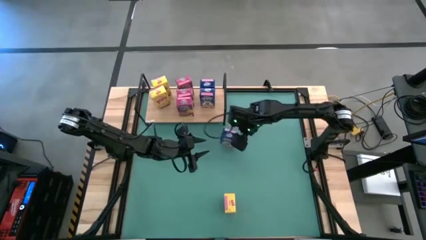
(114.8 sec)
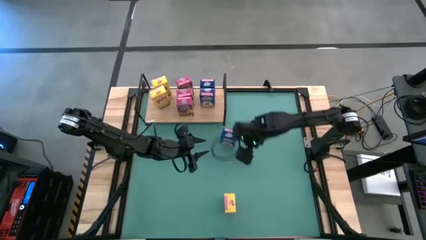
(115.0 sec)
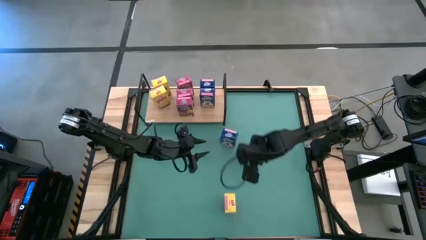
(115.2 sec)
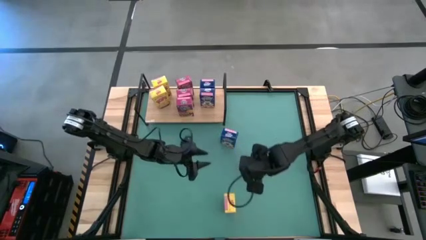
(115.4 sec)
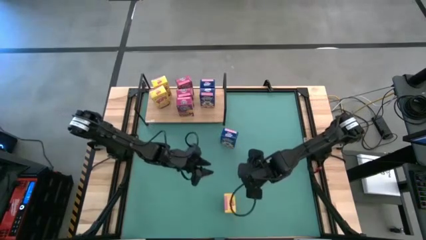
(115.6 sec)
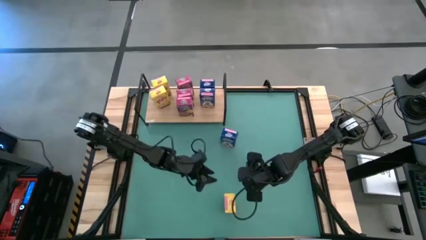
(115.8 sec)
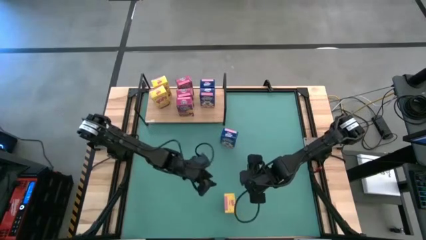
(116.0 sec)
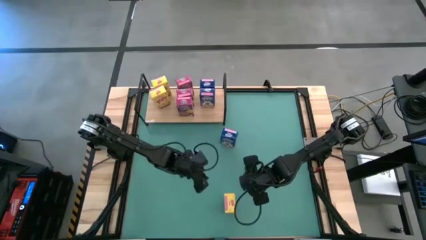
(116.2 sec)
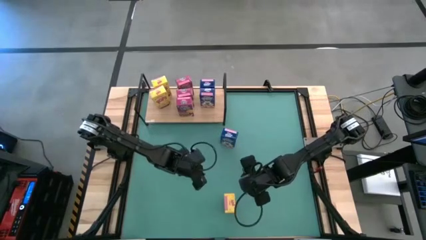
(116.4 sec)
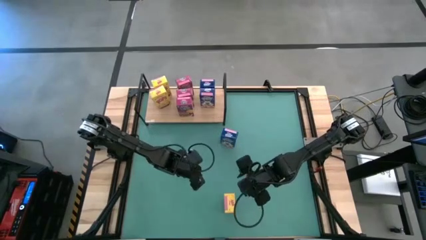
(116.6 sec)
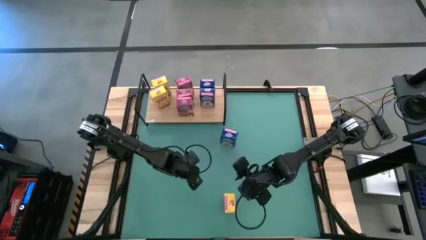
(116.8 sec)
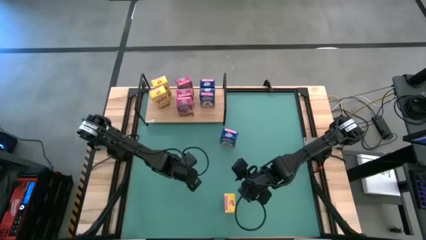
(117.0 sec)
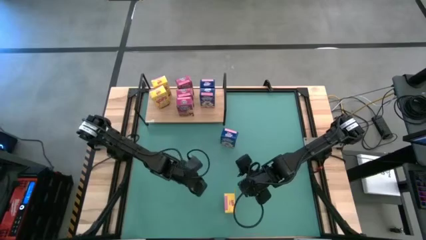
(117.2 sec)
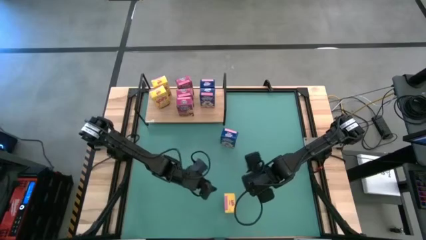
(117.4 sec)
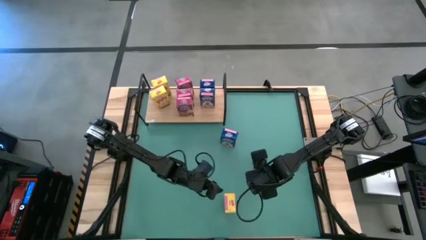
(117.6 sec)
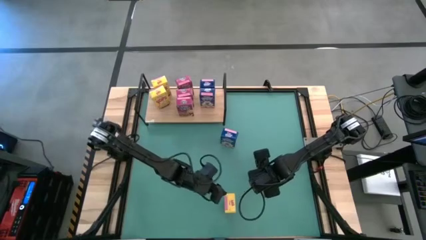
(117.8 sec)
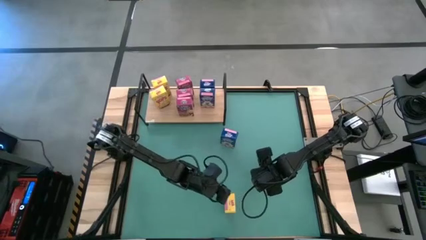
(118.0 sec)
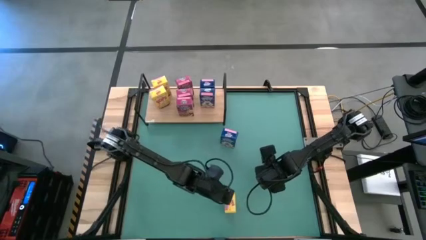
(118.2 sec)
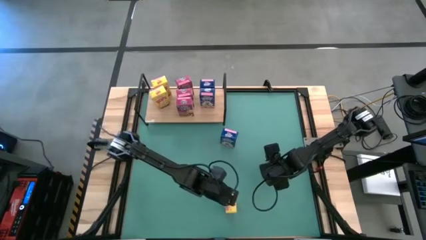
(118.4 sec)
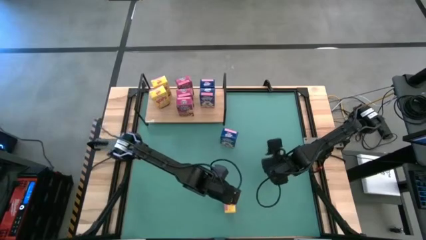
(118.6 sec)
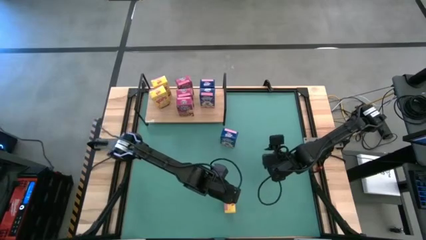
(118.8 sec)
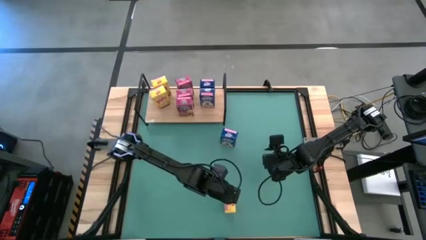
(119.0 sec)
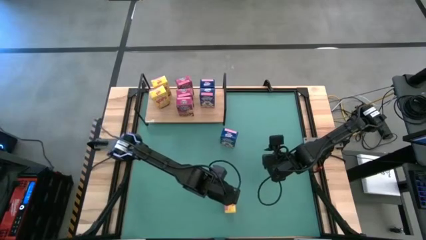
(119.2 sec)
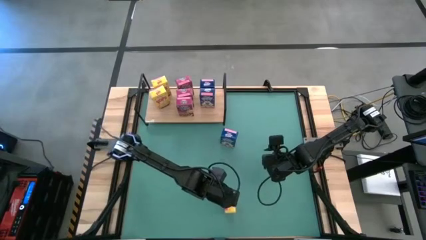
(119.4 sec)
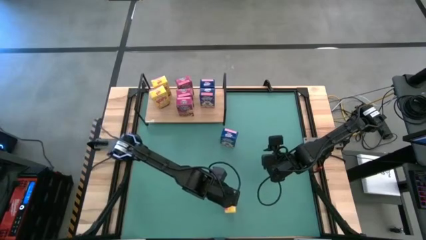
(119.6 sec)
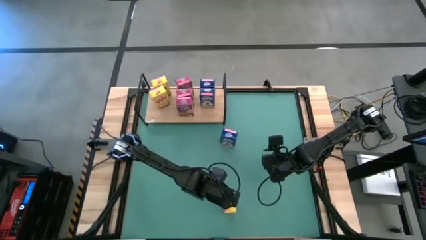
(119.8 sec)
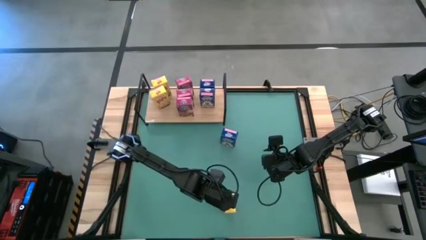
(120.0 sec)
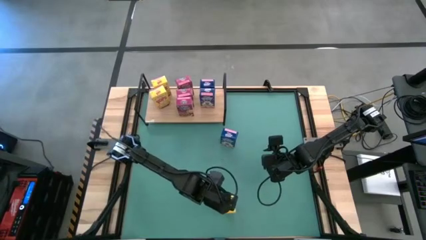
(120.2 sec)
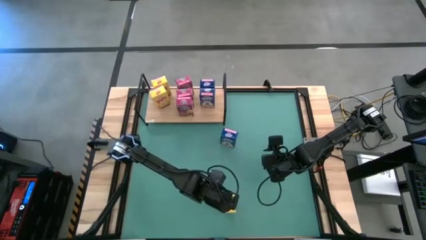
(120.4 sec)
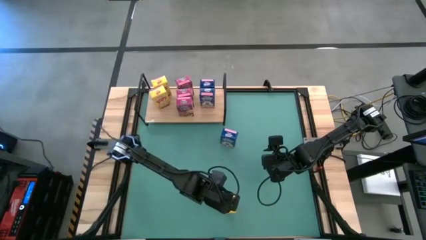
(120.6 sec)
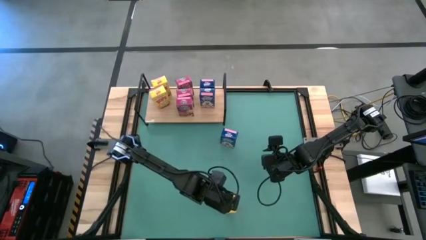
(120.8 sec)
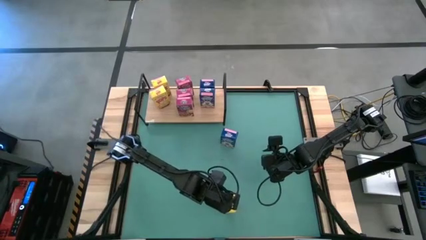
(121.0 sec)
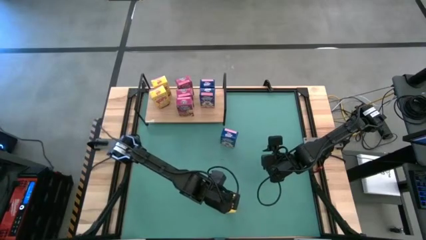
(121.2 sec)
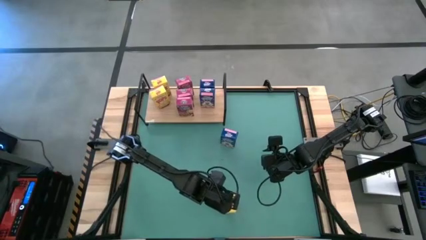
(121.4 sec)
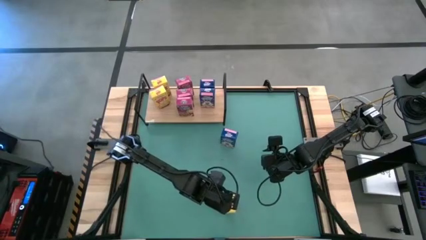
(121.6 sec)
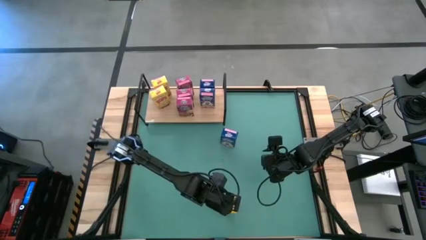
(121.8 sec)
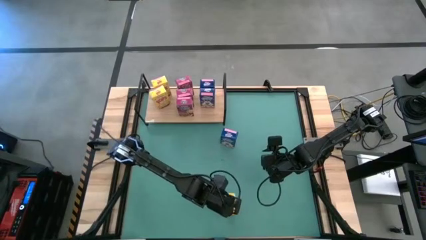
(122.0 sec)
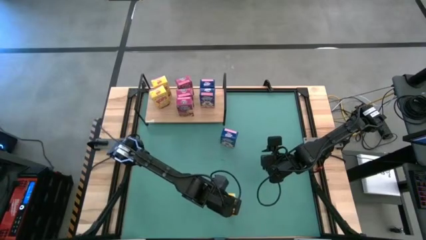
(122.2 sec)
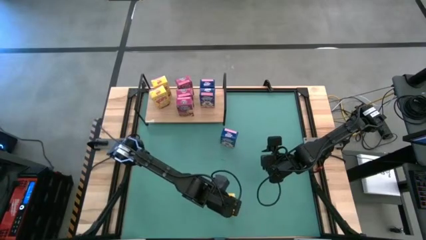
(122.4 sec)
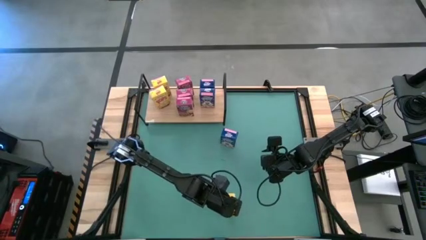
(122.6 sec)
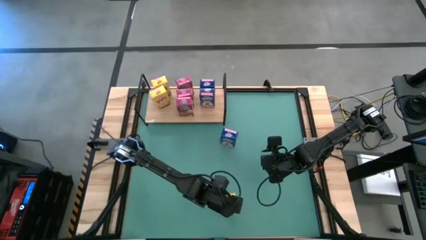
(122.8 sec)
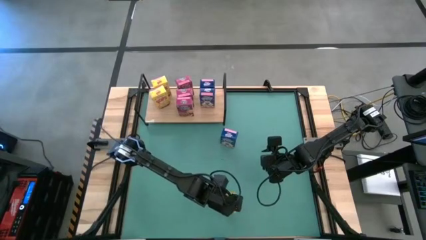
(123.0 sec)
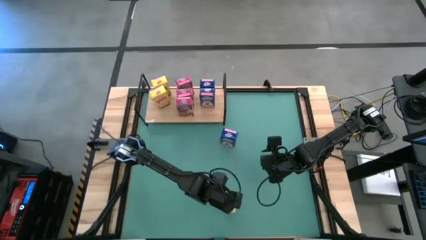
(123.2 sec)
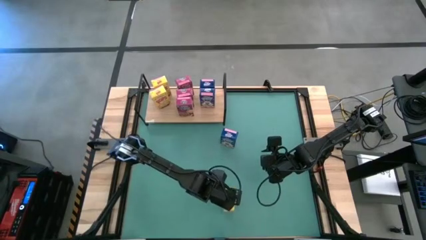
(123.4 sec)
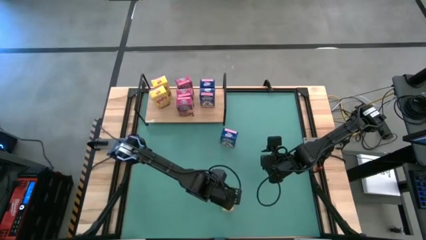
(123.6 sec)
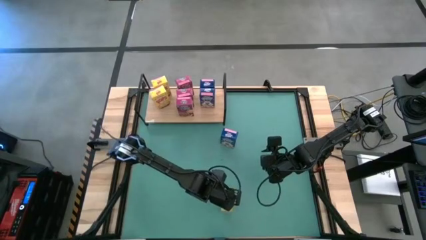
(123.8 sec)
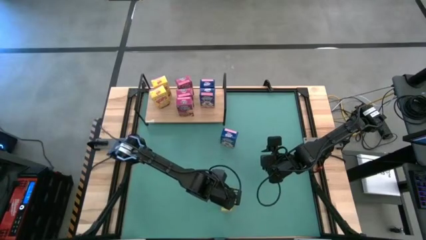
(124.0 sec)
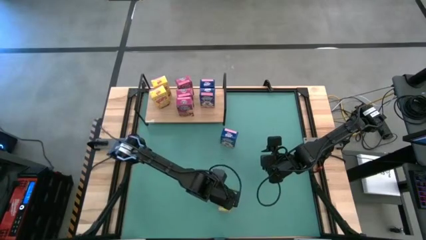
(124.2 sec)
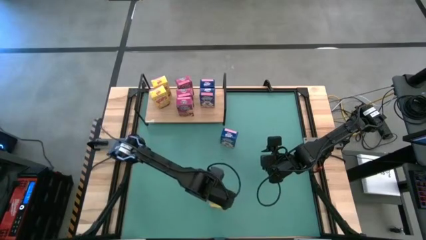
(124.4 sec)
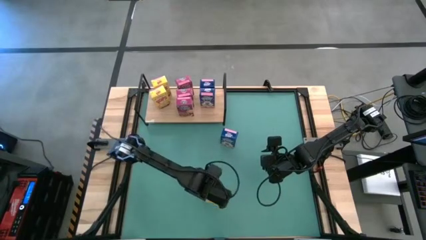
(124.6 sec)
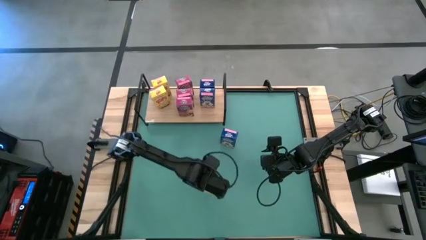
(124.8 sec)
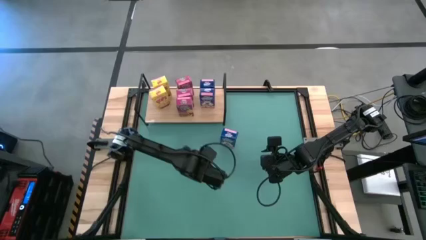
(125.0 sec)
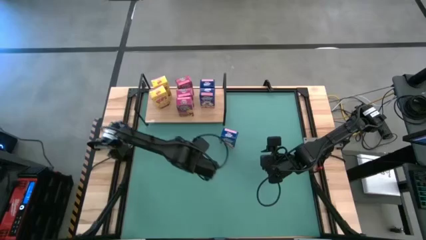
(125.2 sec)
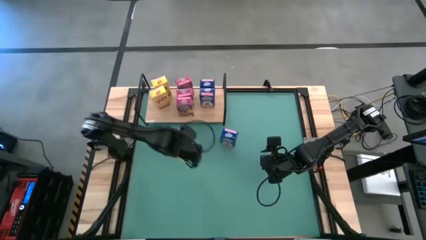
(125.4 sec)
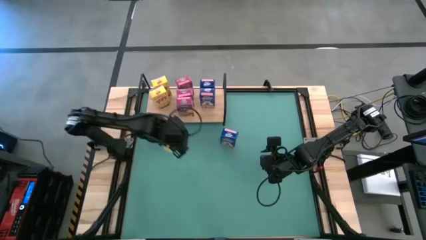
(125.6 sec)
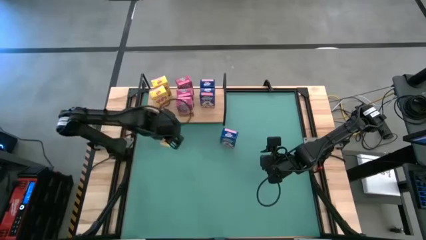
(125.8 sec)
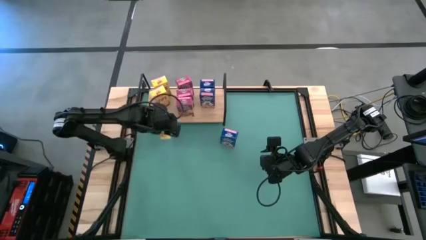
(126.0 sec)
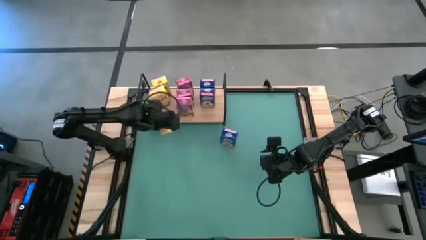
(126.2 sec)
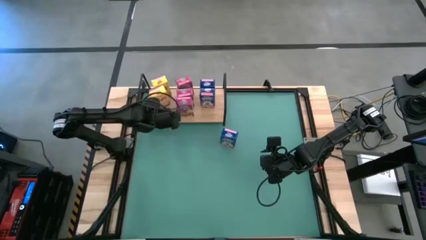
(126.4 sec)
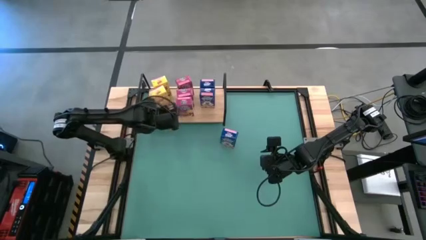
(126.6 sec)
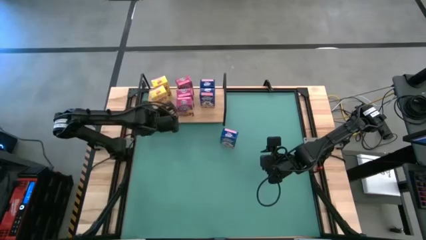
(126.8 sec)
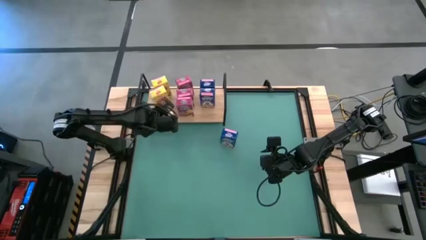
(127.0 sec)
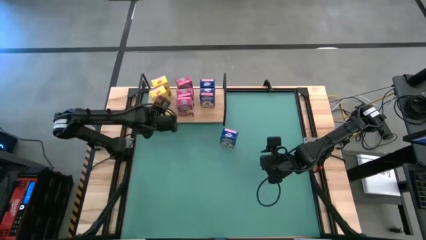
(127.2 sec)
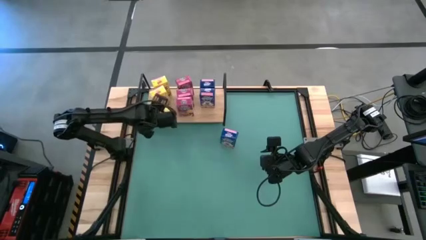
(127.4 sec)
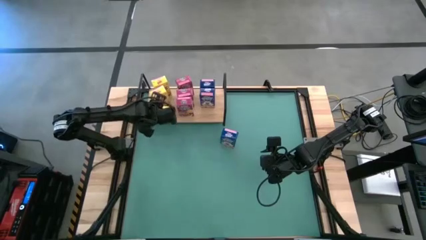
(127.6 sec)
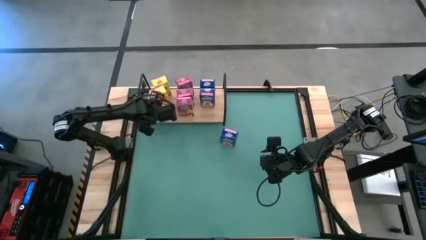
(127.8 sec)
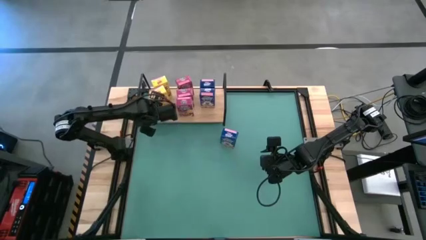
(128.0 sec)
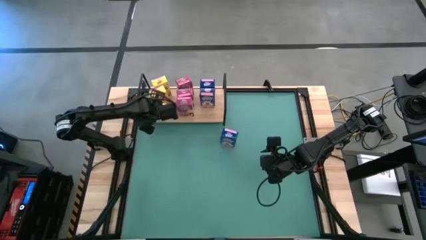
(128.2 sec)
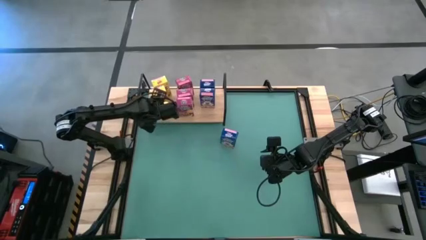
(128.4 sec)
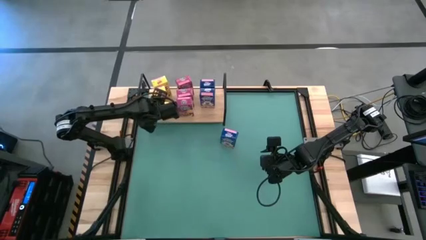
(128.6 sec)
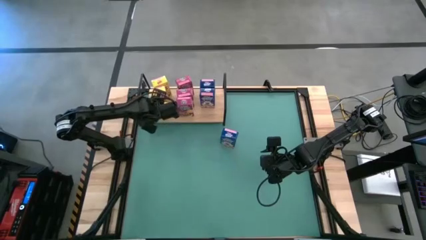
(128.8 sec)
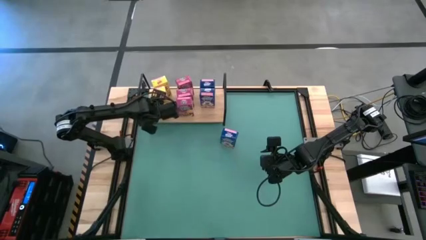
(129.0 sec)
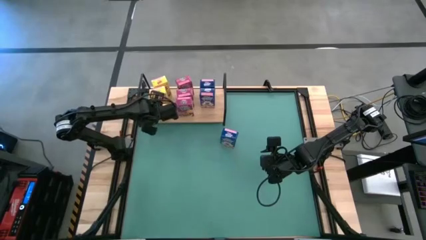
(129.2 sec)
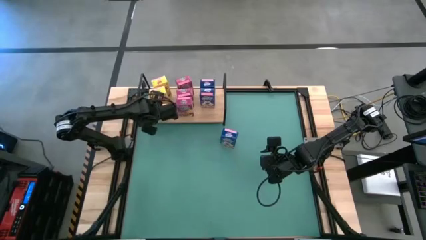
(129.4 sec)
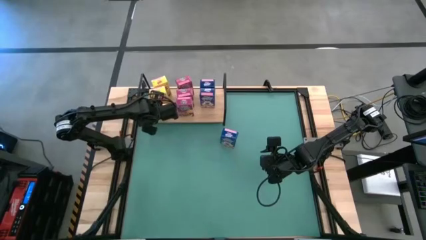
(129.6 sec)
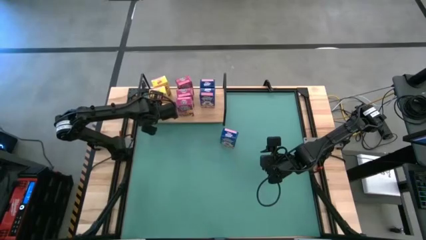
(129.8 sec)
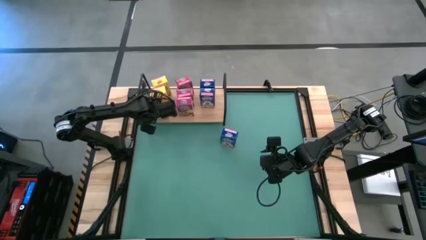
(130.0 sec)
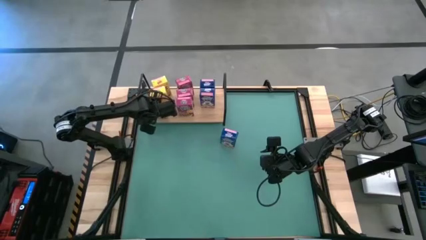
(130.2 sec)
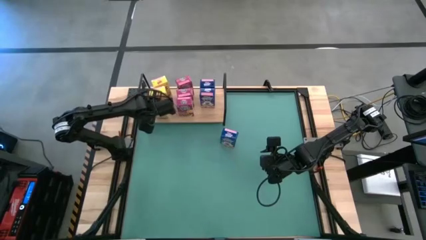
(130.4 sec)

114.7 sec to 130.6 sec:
Task: Stack cereal on shelf
Put the yellow cereal box on the shelf aligned with the other yellow cereal boxes
